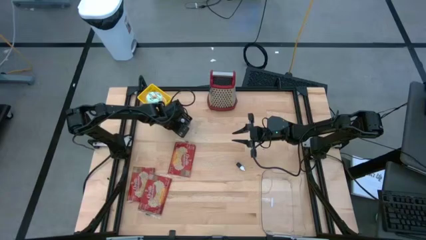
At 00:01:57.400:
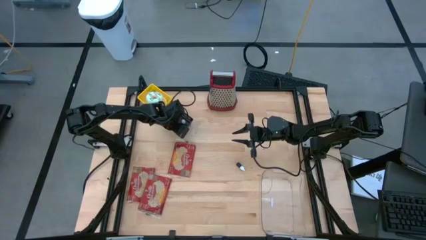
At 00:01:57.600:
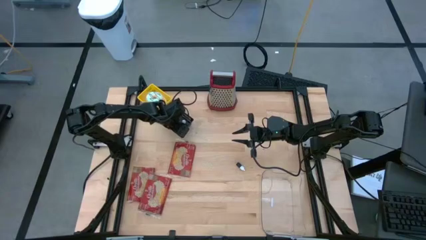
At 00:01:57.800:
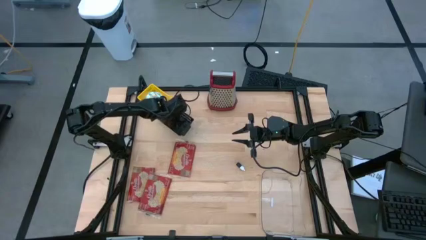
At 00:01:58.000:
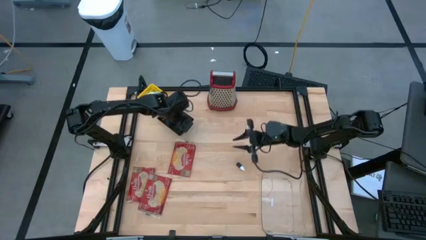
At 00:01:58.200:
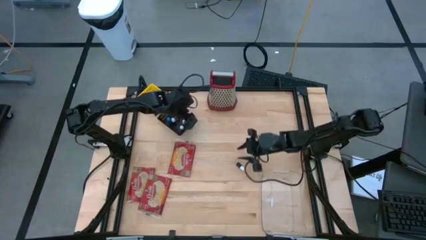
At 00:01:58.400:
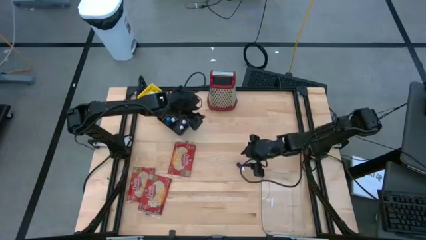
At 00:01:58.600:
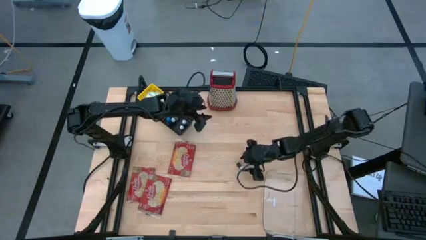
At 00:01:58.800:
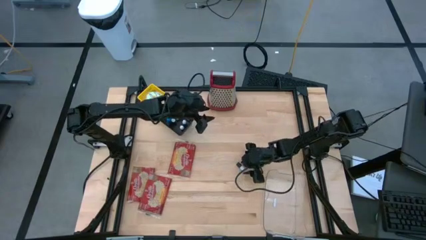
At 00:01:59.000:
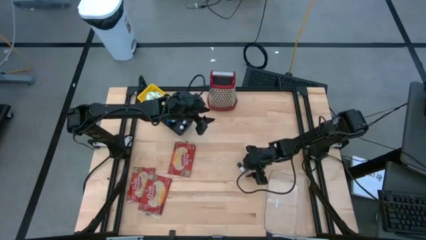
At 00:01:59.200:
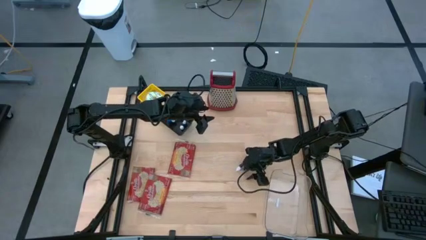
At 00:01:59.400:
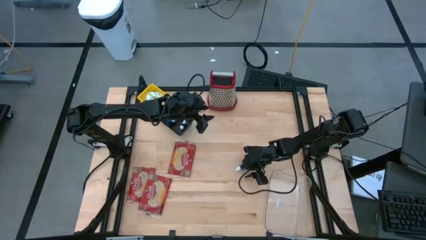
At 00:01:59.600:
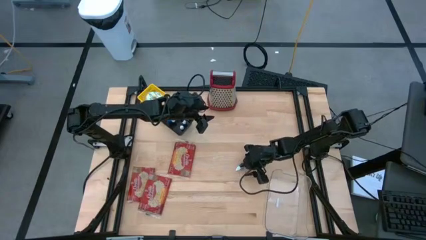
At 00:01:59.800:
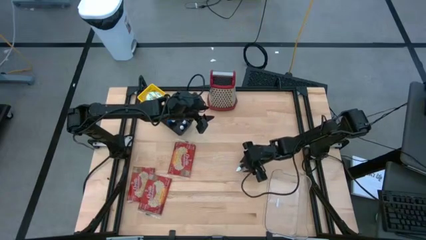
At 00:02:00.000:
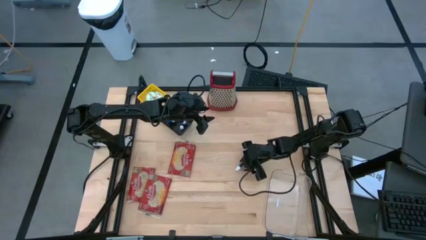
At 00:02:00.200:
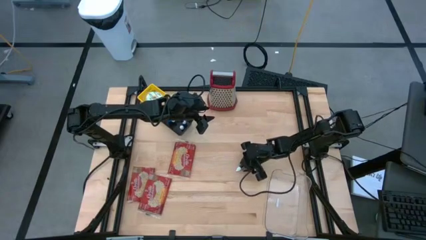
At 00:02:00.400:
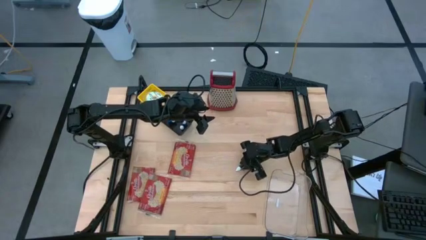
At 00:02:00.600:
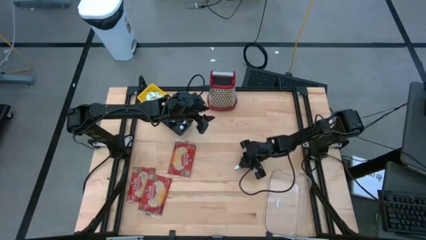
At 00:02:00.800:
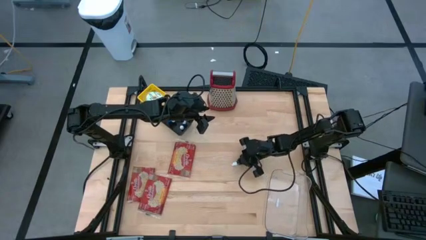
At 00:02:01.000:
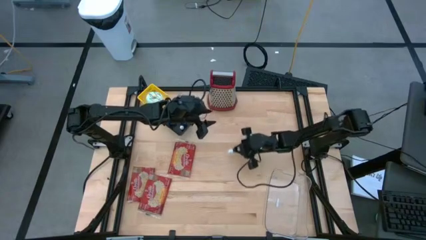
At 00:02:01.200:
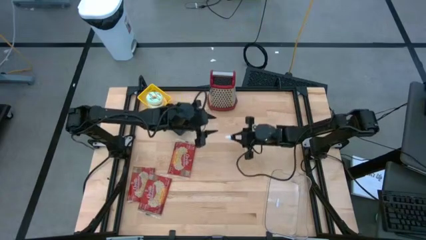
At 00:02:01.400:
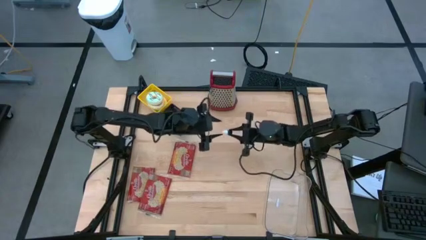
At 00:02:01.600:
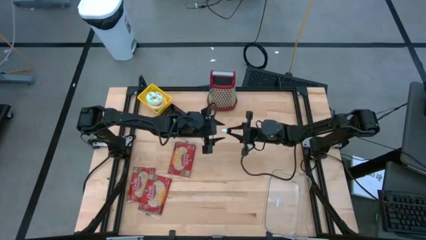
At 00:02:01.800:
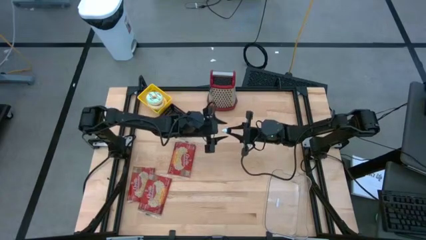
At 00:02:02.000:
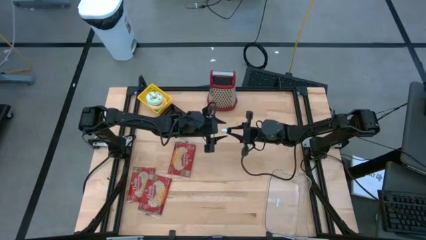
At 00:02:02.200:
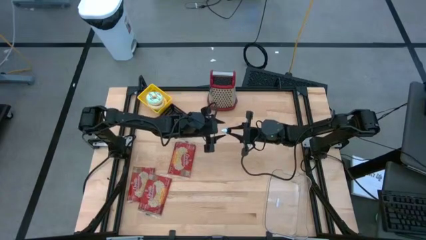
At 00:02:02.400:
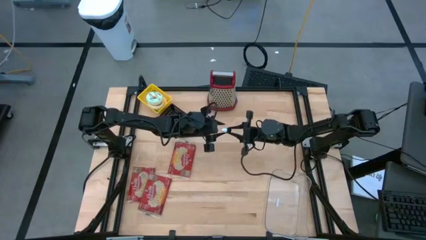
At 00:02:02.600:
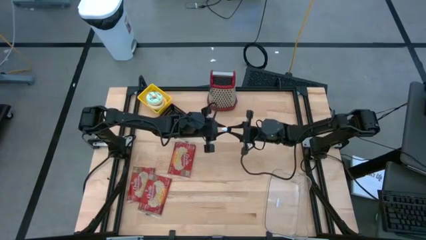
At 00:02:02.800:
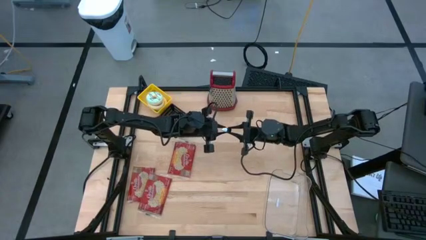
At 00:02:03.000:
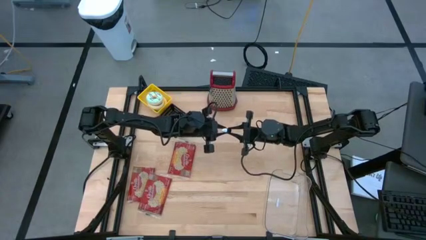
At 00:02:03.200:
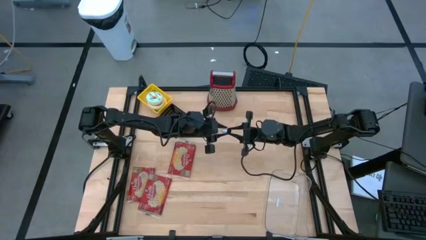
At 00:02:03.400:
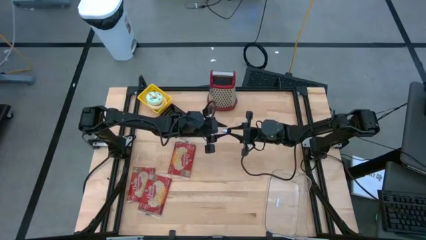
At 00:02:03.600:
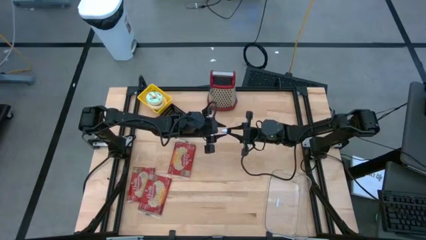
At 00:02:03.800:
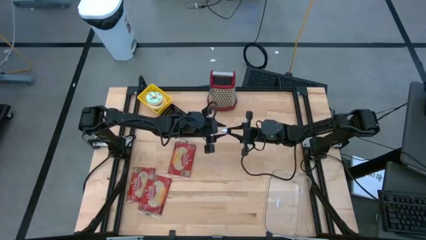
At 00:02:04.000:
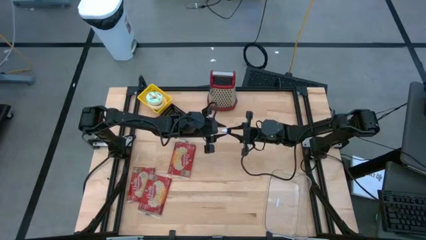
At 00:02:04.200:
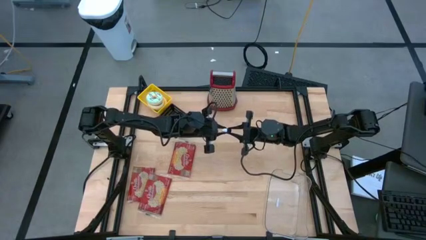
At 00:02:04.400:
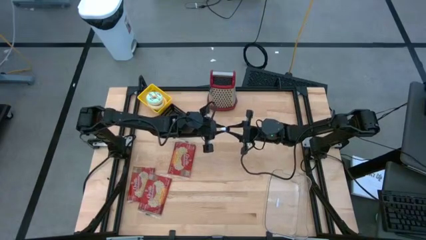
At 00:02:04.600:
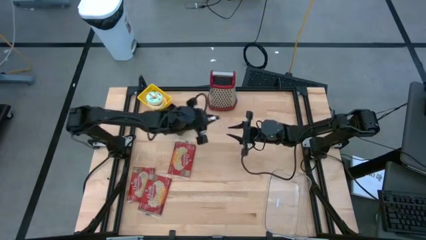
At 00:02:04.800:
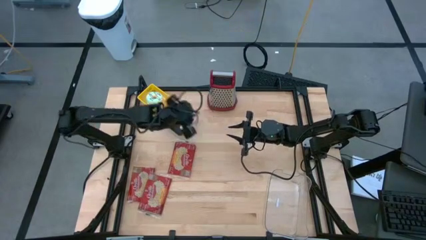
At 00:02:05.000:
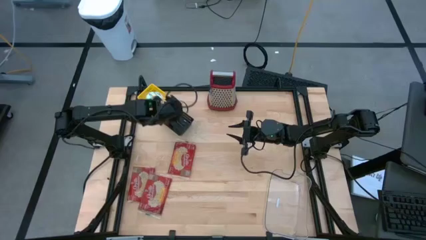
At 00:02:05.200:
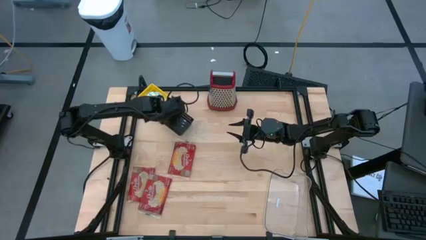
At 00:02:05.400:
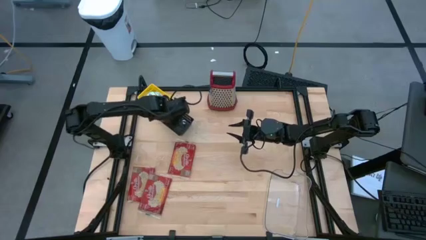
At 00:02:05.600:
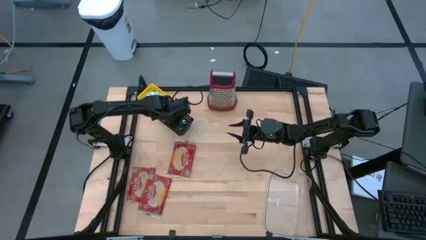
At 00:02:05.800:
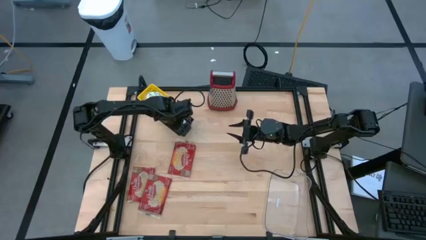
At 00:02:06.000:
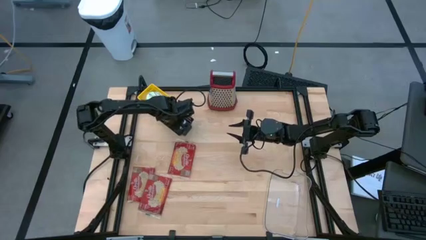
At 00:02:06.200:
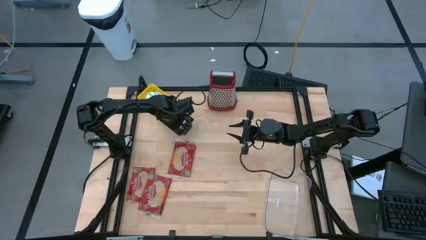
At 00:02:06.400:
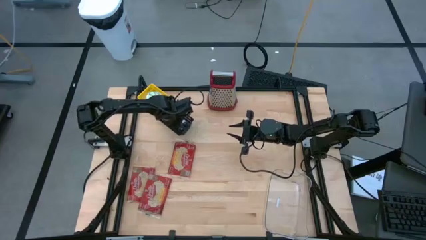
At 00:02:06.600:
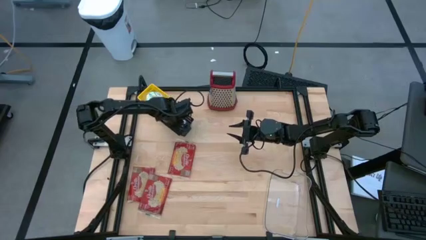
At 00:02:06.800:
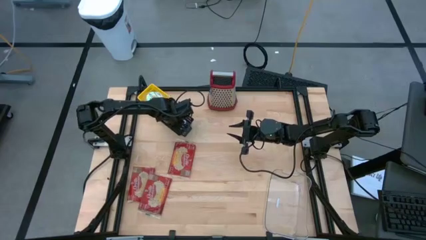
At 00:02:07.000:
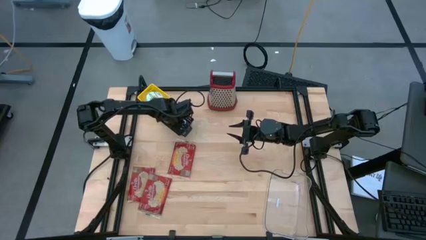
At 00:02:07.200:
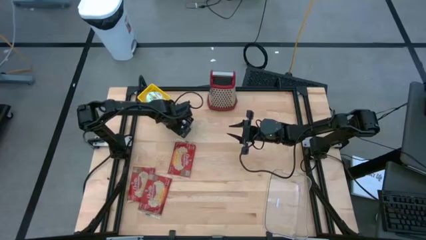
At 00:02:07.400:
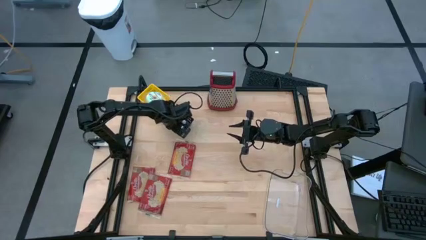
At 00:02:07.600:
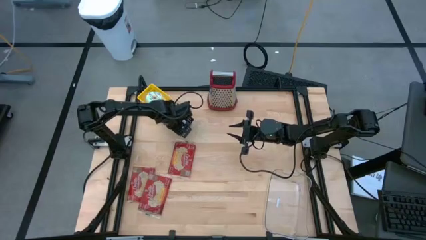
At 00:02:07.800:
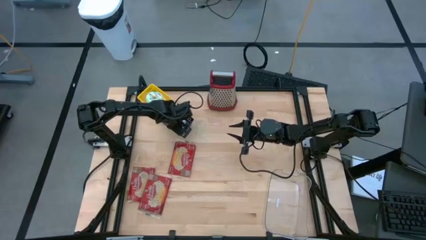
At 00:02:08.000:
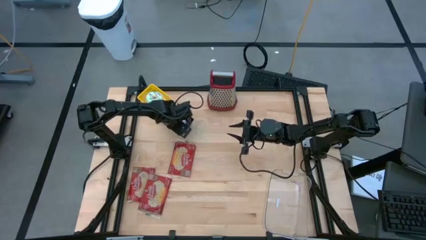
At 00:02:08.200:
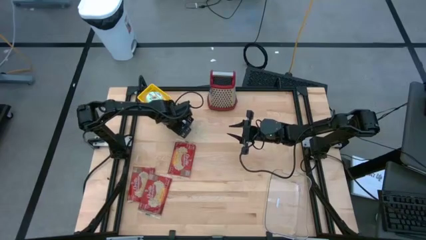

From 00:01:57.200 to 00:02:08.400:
Put the green food coloring bottle into the black bin

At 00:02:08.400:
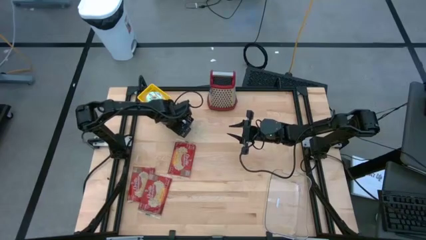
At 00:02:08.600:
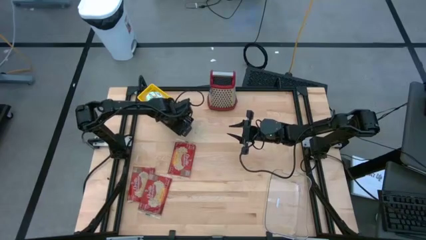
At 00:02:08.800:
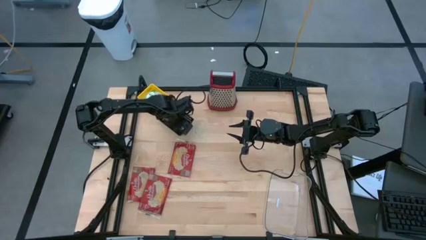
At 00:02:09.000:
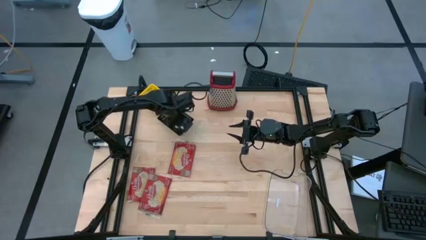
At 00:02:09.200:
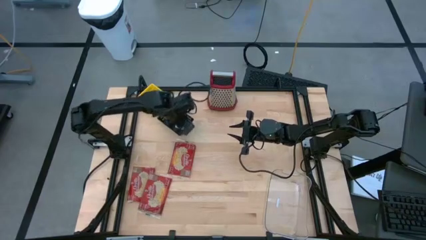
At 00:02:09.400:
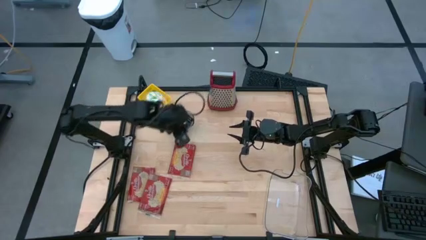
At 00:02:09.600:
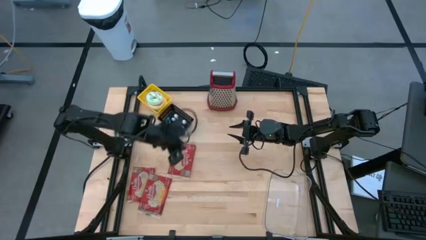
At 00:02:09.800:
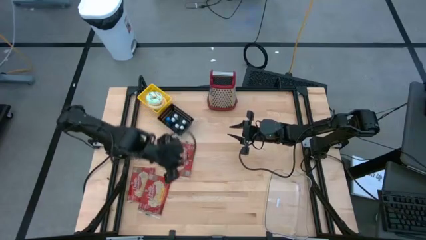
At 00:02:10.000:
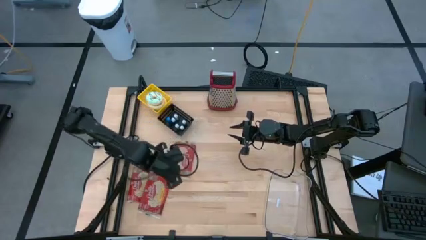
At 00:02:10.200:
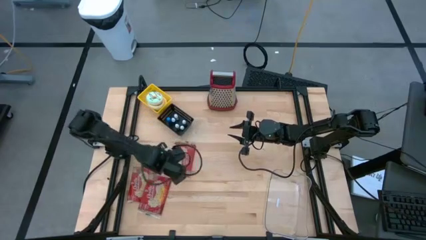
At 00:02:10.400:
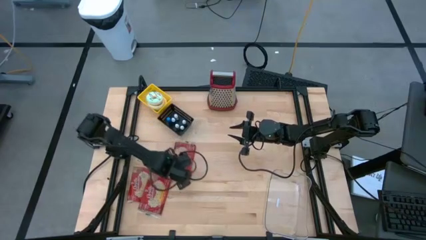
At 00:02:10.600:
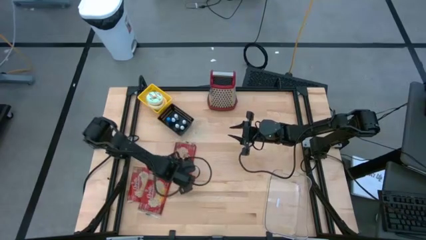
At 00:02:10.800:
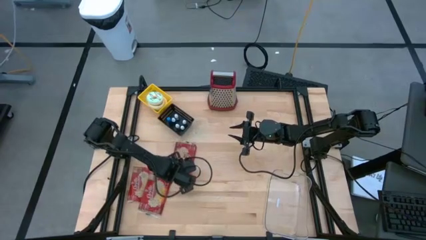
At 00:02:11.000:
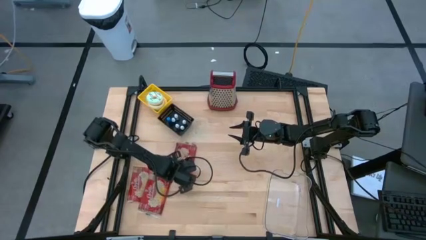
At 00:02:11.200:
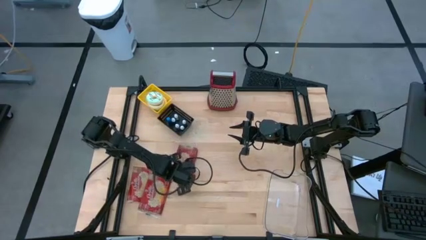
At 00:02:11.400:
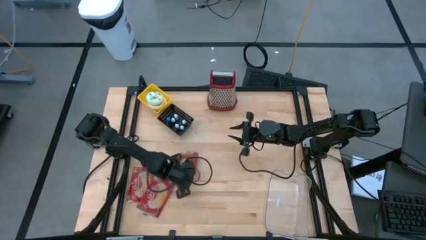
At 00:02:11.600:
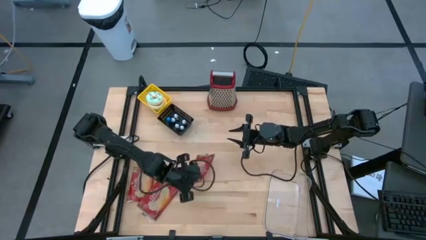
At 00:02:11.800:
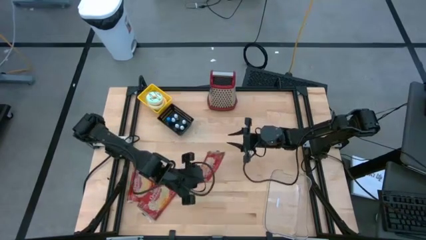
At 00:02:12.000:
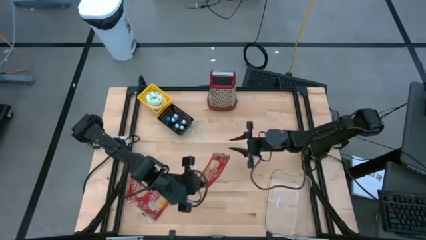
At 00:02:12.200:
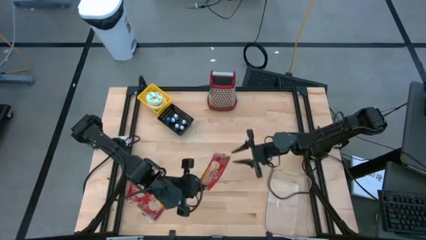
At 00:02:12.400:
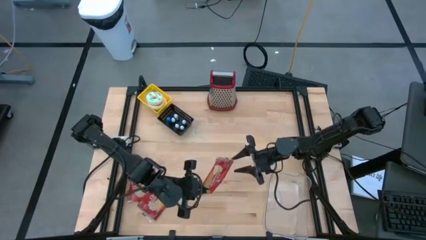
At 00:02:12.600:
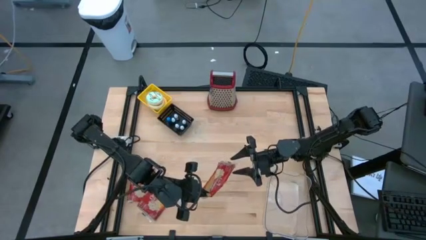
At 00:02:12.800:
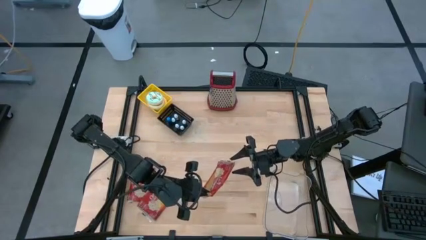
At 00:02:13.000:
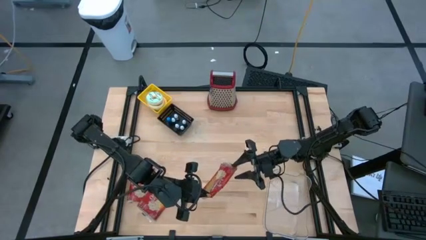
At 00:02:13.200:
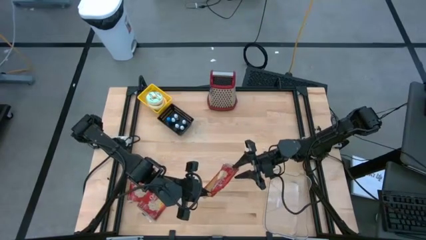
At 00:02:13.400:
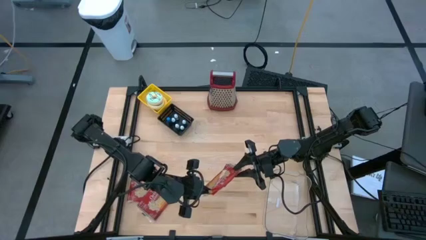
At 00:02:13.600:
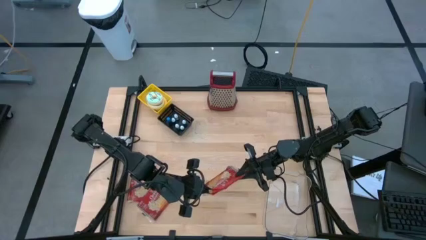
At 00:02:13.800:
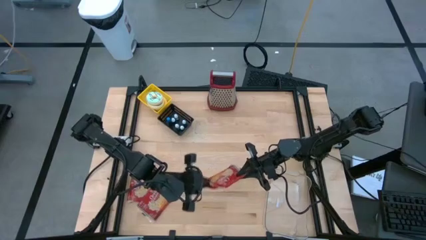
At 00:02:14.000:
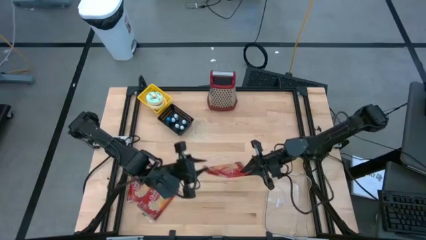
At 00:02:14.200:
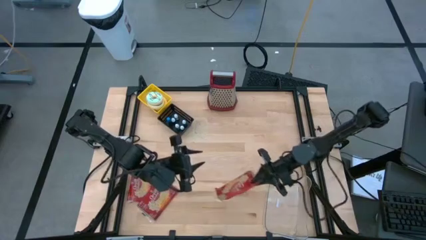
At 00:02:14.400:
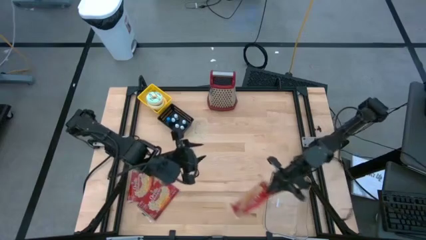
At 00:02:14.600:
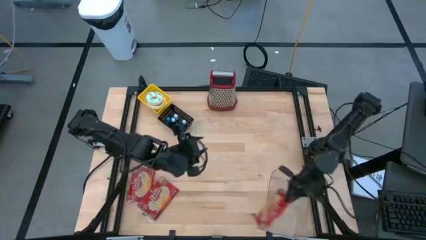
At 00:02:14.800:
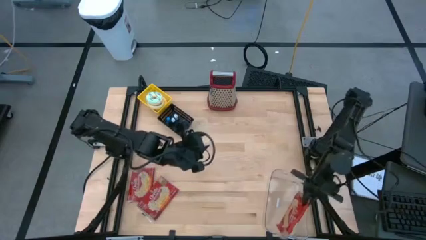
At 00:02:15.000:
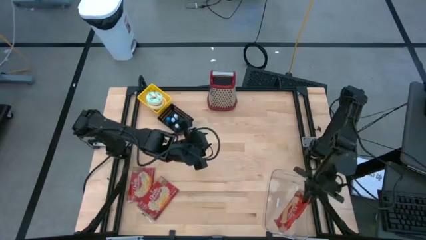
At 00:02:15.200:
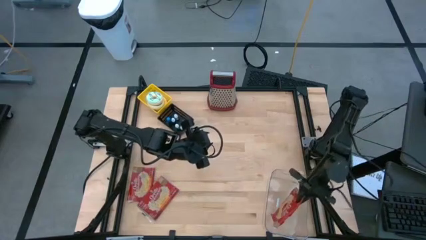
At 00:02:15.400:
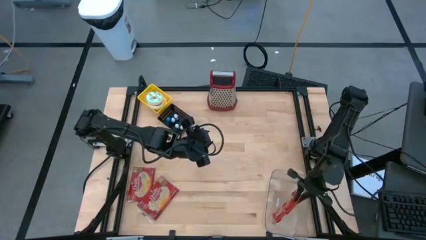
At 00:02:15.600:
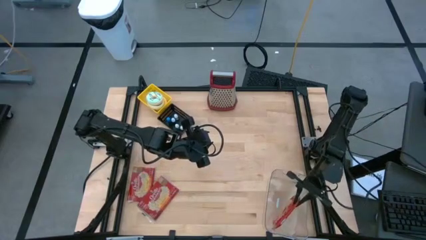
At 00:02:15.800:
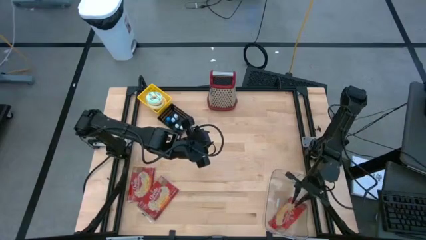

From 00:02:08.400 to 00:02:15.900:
Put the top red popcorn bag into the transparent bin
